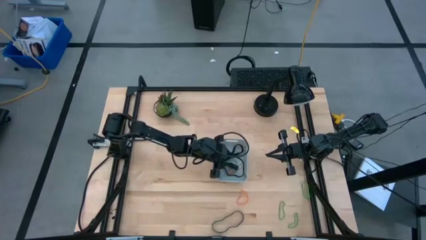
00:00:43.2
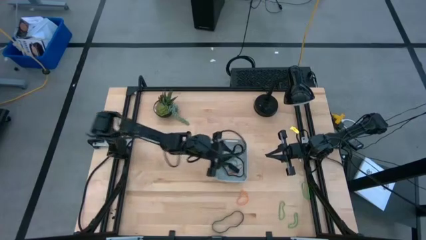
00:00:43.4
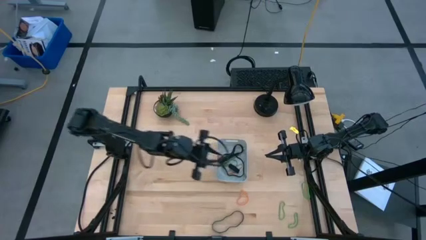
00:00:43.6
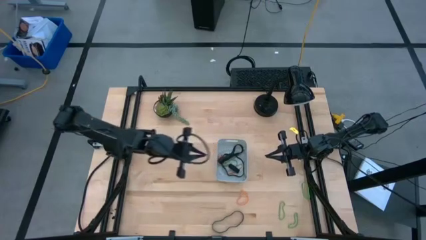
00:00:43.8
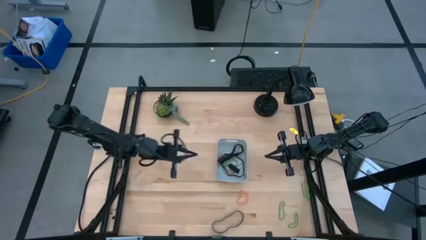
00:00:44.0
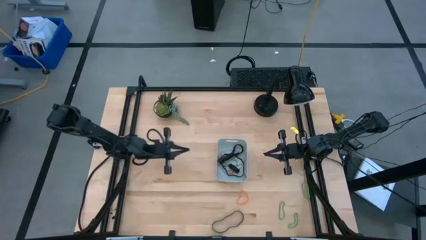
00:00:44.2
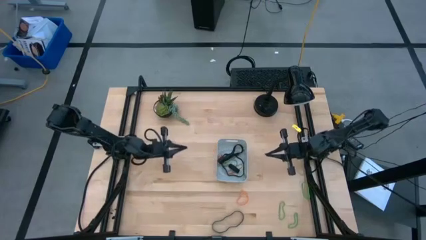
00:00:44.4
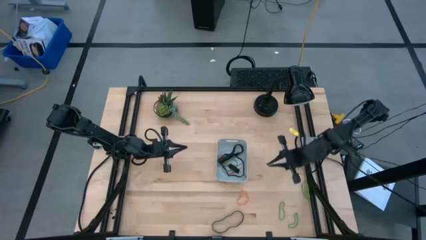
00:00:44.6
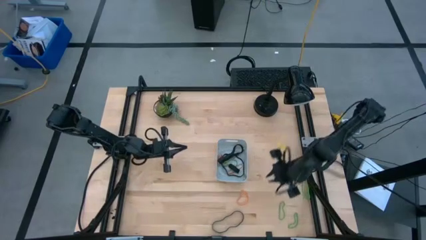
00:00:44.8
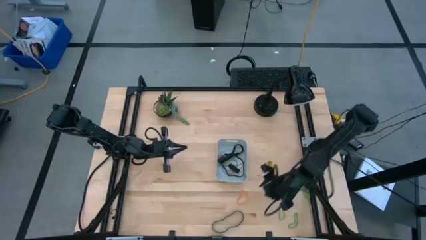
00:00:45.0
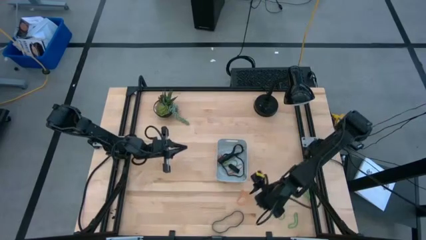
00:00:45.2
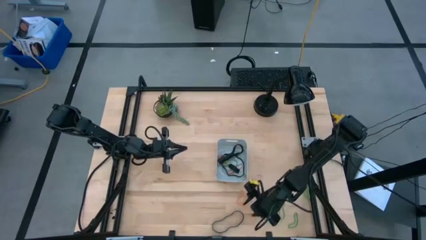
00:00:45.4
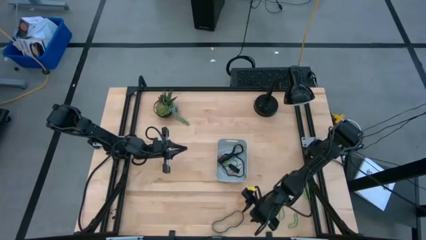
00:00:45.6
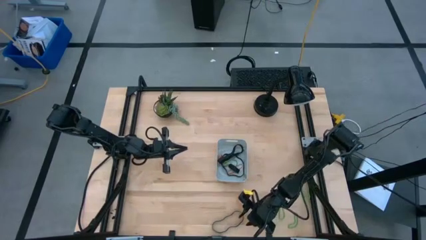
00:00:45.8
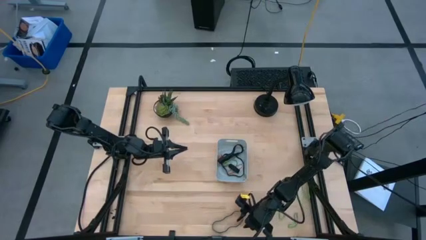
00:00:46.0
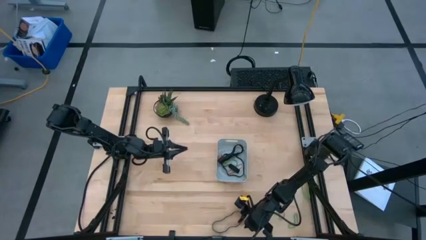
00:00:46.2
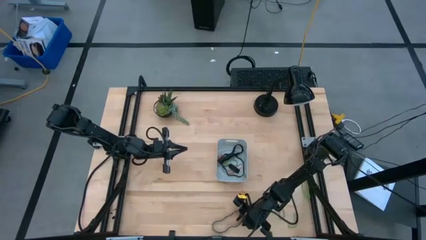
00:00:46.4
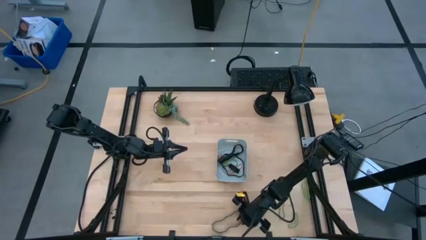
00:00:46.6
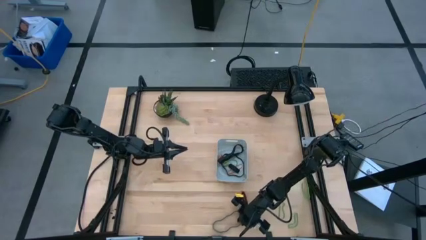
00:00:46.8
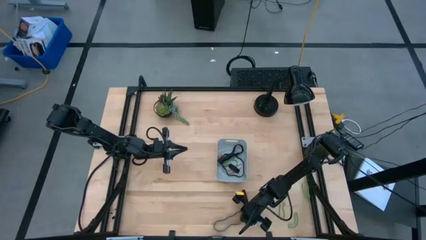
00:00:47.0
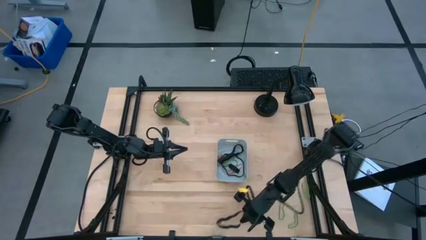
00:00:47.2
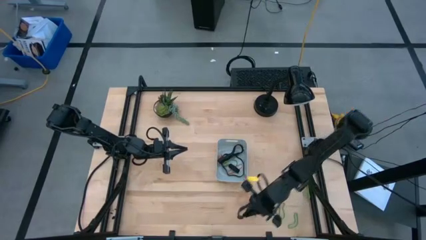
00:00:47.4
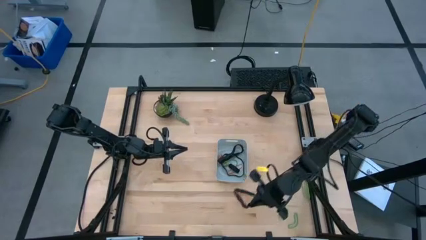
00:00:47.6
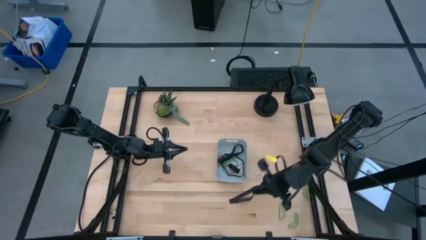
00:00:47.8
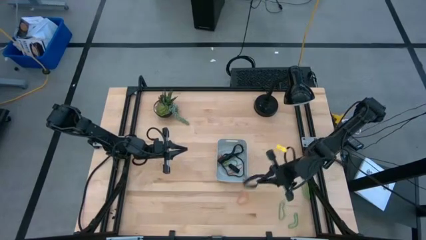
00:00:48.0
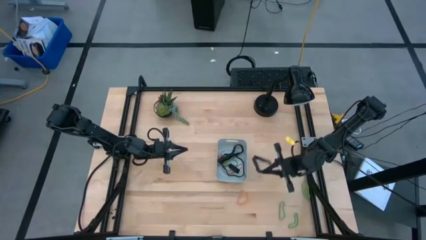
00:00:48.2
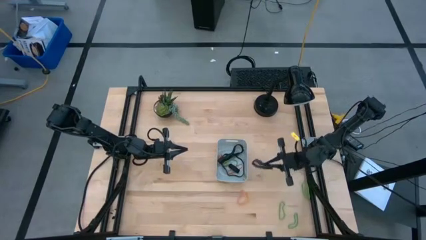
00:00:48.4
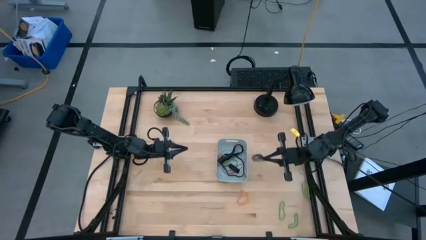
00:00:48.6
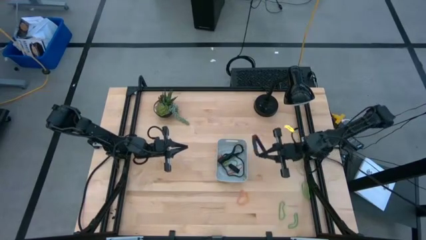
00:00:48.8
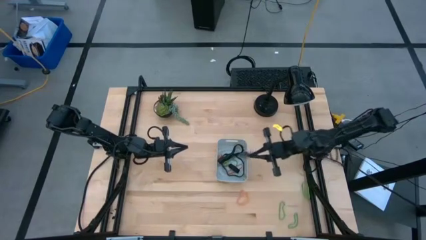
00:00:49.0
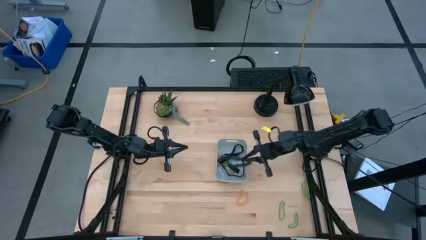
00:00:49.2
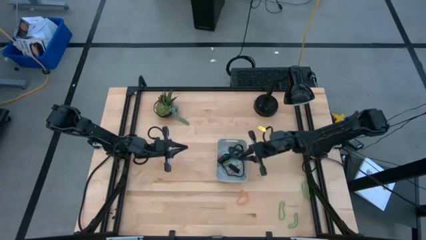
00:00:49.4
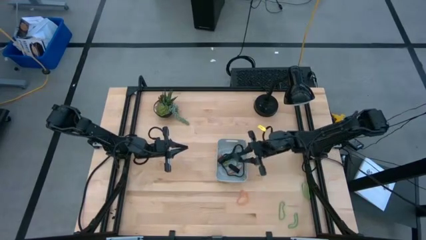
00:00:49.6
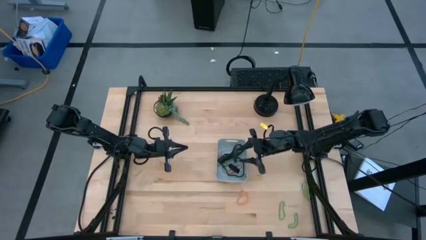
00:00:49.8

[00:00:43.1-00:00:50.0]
Task: Pick and place rubber bands into bin
Put the black rubber band into the white bin

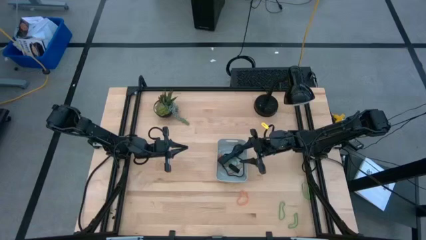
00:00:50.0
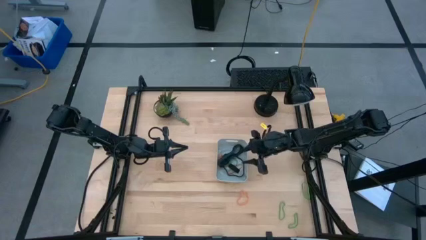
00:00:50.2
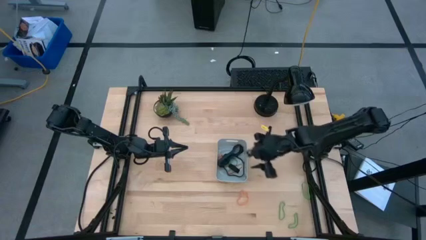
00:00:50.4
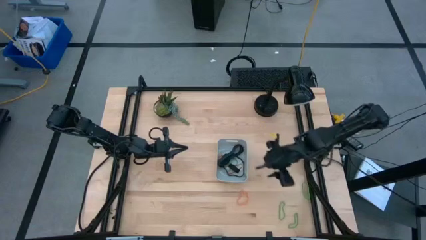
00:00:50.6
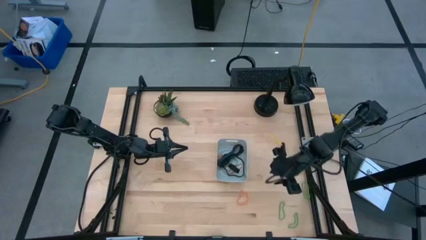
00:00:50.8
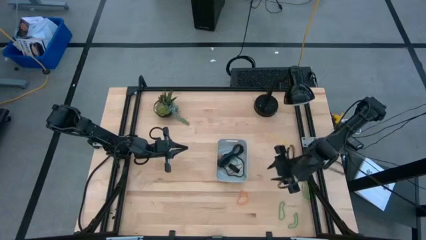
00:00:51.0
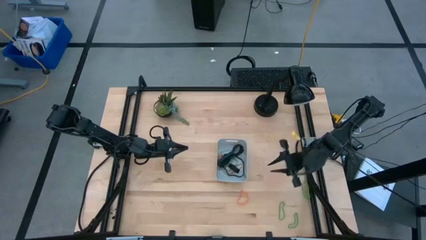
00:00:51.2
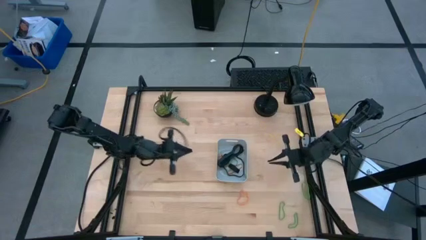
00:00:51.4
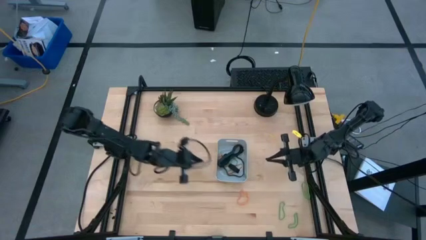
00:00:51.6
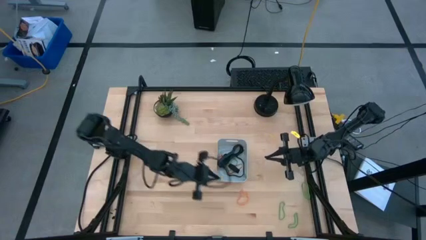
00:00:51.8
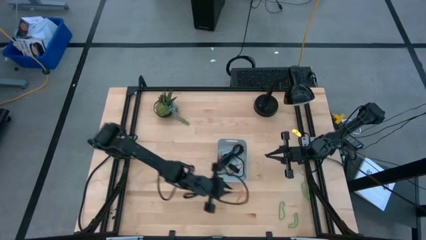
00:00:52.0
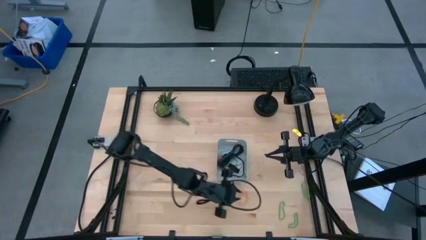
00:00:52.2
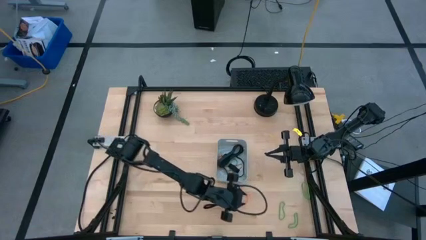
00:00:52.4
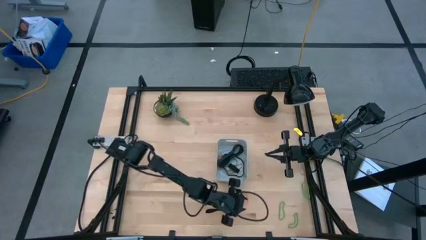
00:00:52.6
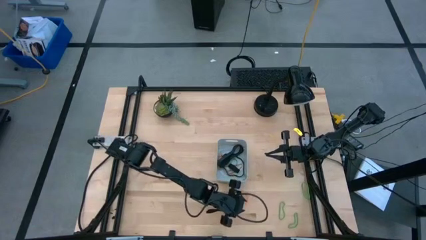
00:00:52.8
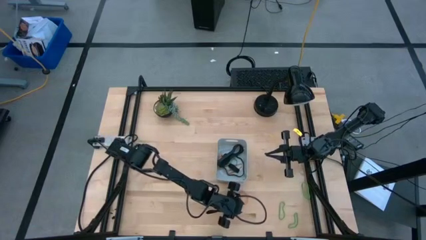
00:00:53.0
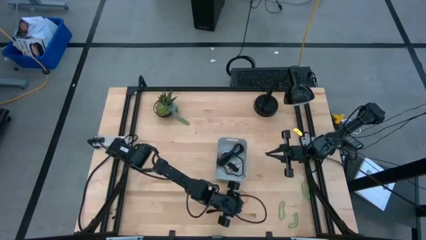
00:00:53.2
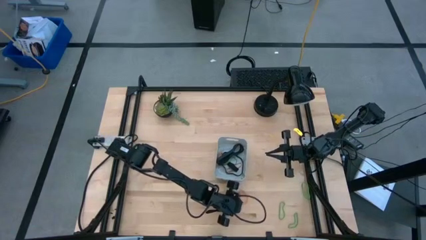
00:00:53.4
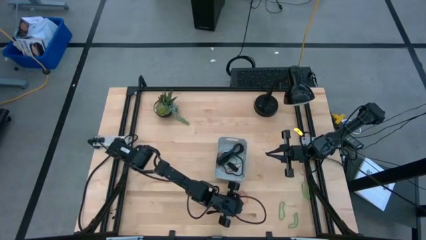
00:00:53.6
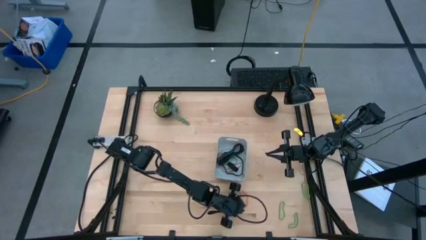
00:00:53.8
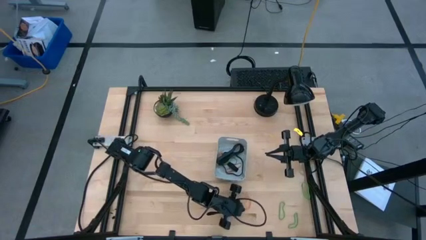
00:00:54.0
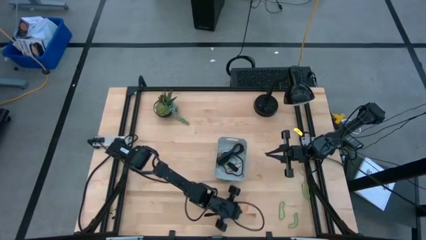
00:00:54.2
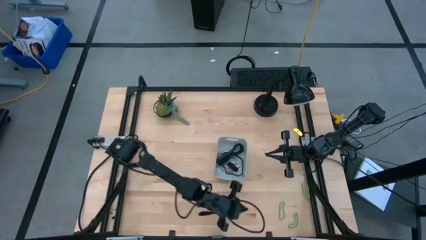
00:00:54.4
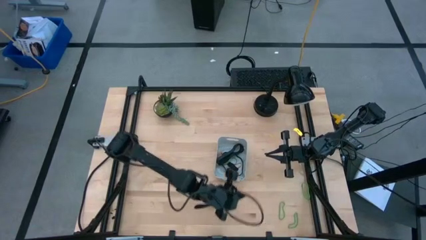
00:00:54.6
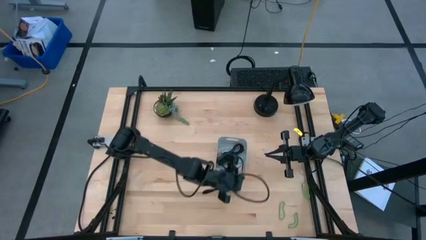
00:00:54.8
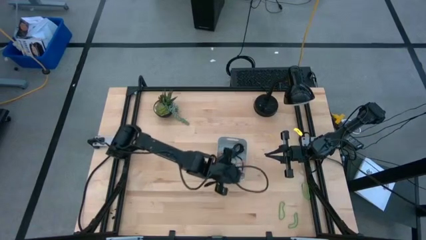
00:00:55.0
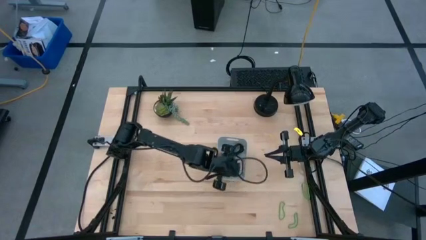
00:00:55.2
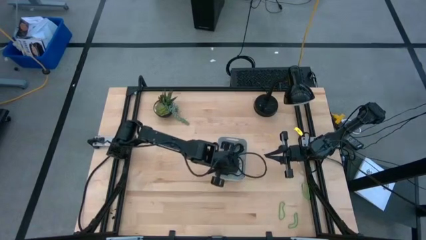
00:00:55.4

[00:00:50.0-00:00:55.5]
Put the orange rubber band into the white bin

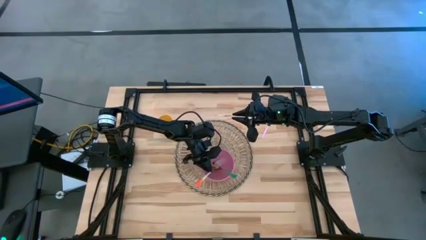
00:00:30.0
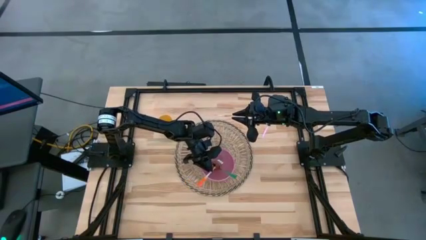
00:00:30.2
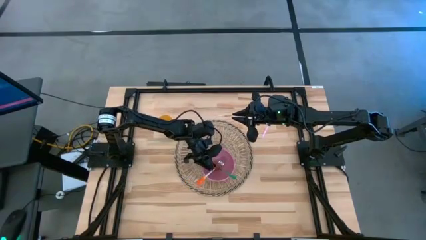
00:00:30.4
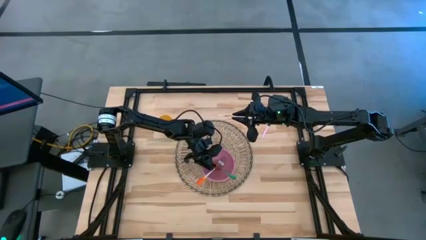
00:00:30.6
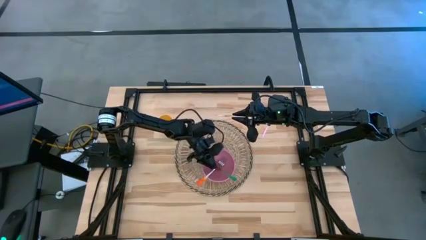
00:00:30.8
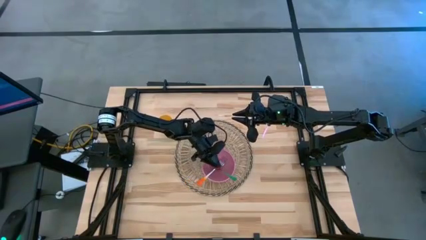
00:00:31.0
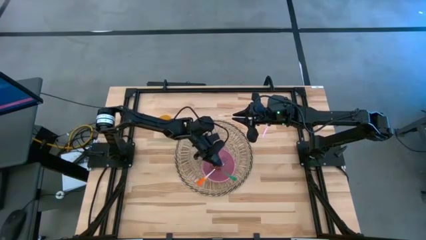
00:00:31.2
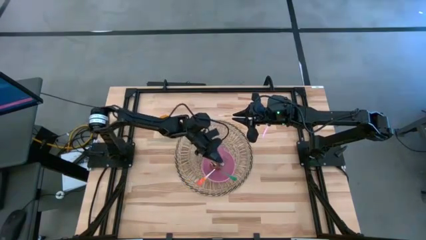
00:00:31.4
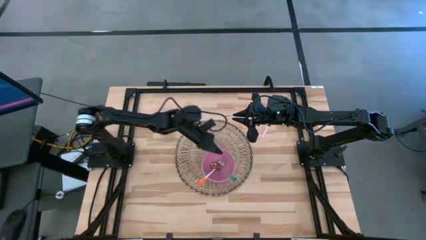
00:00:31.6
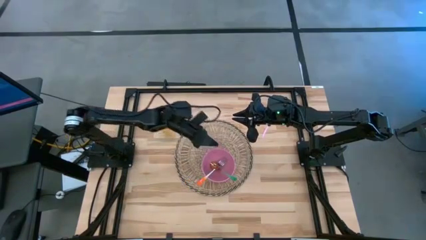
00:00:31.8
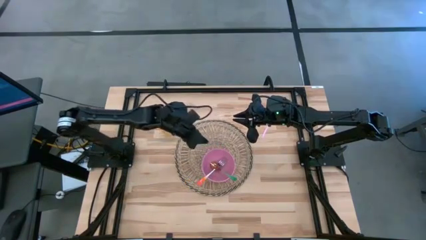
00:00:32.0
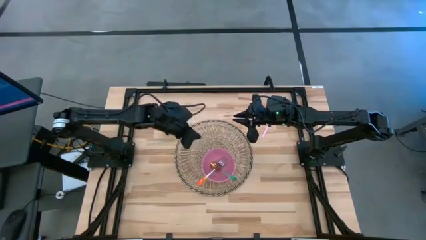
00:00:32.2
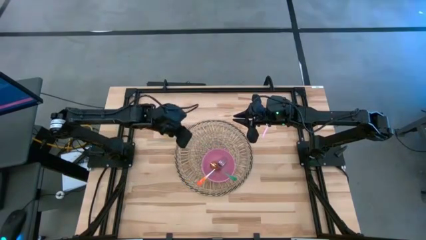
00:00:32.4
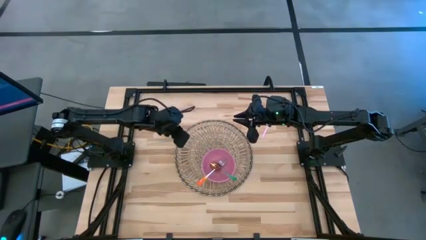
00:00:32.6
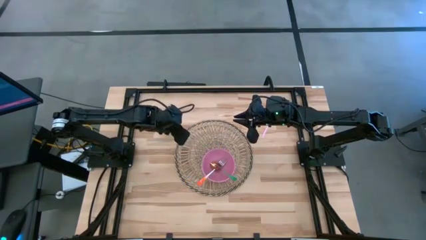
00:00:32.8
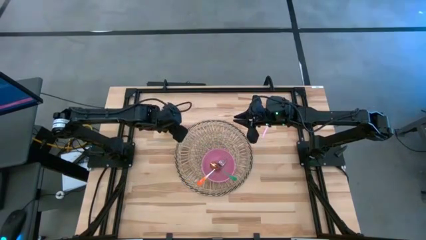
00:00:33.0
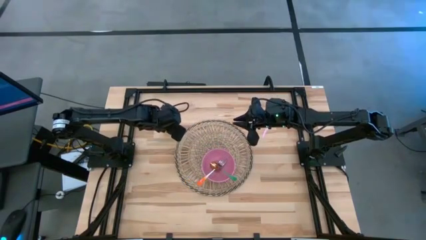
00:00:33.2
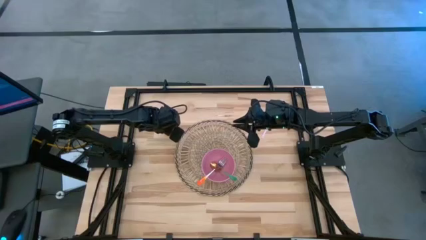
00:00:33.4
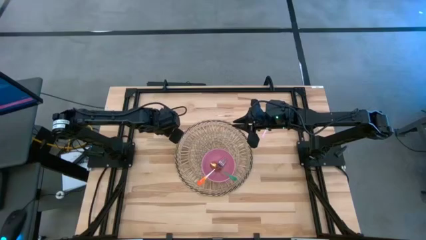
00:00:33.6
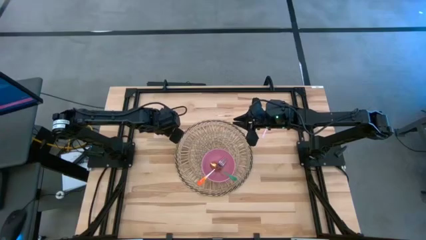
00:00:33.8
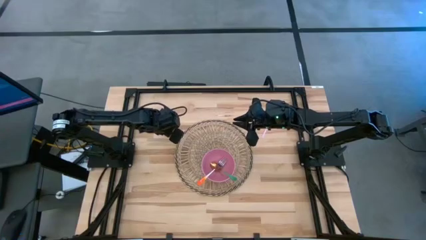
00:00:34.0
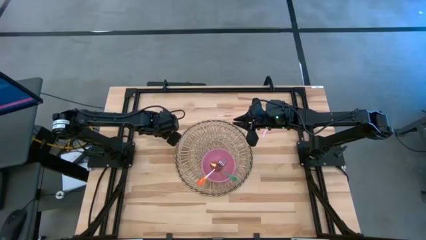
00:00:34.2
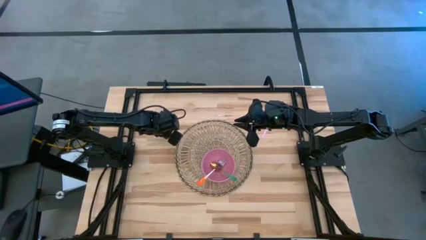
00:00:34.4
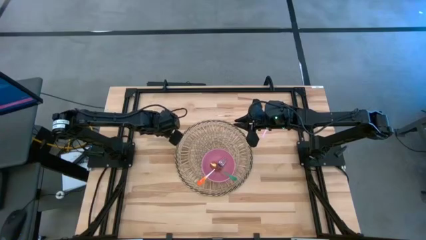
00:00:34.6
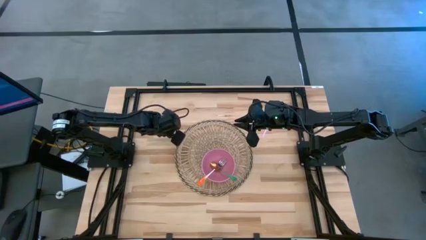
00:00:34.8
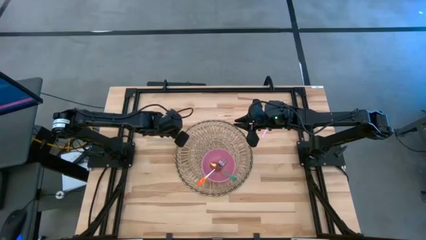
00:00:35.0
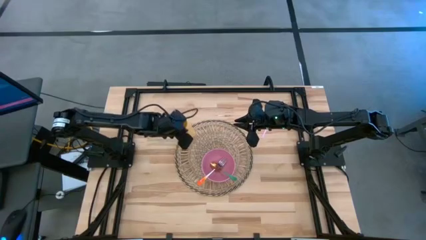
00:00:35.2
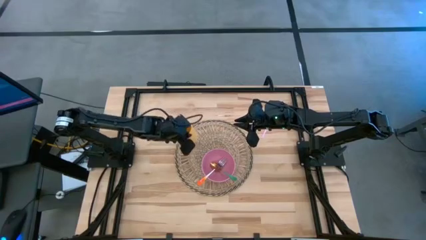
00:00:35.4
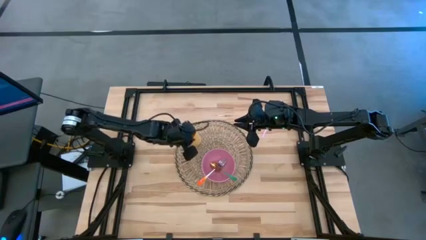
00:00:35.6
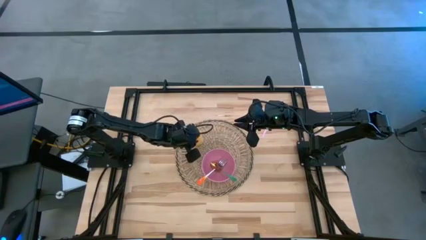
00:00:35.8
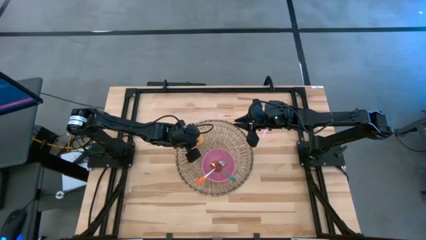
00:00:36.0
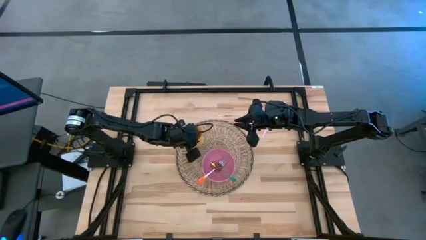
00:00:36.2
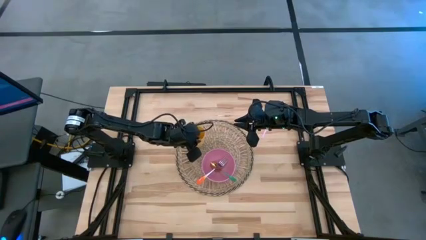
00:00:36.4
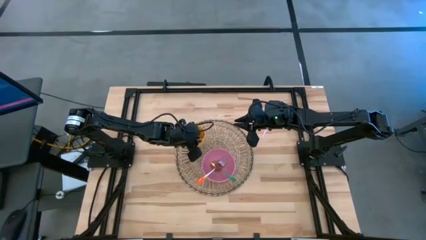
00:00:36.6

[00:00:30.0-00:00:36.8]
Task: Pick & Place Utensil
Put the yellow cup on the mat to the top left of the pink bowl
